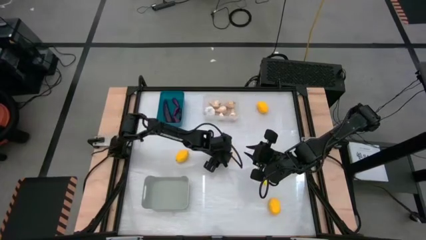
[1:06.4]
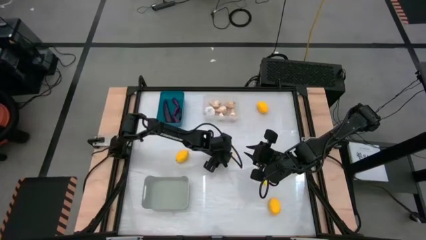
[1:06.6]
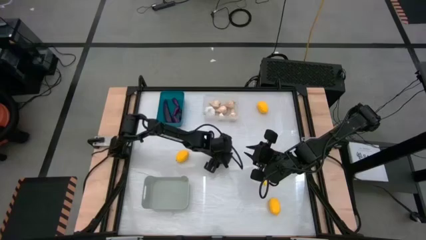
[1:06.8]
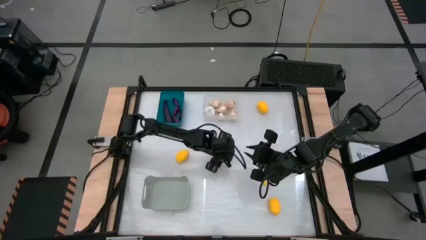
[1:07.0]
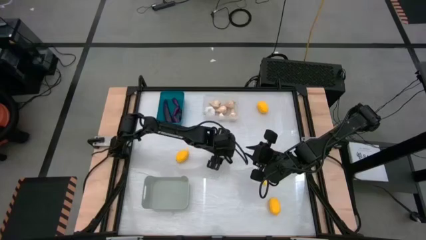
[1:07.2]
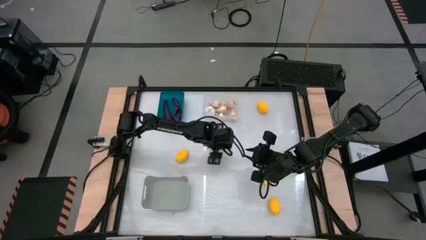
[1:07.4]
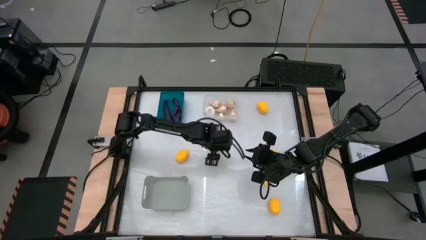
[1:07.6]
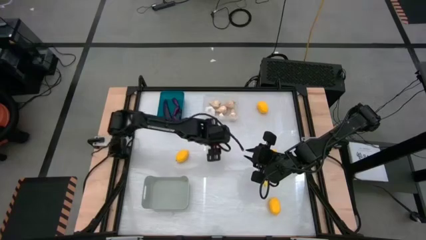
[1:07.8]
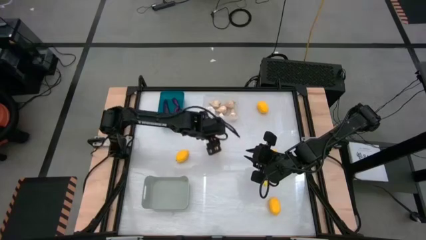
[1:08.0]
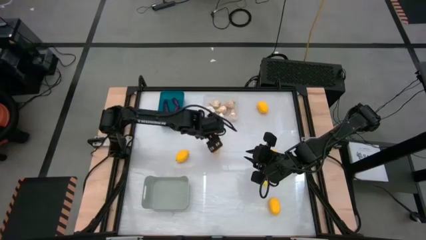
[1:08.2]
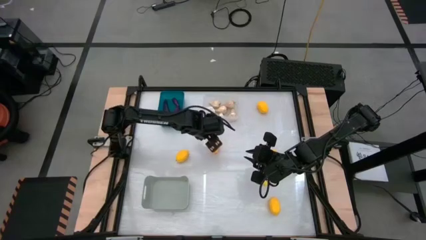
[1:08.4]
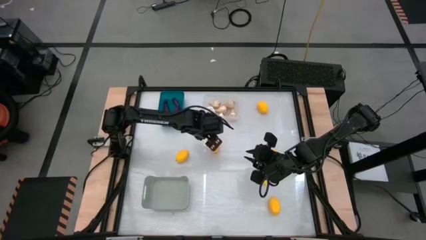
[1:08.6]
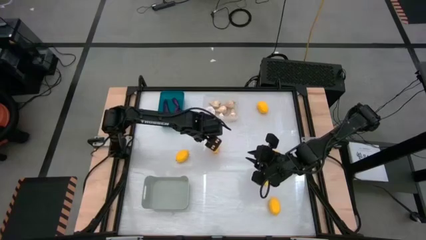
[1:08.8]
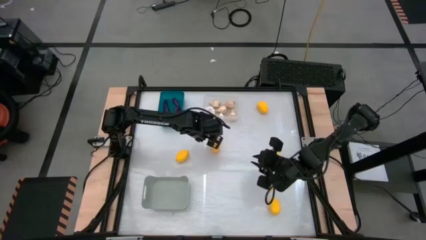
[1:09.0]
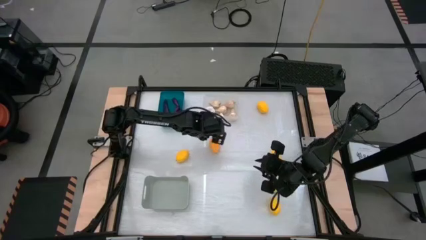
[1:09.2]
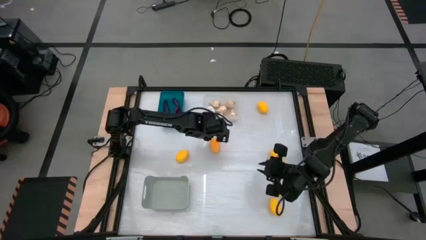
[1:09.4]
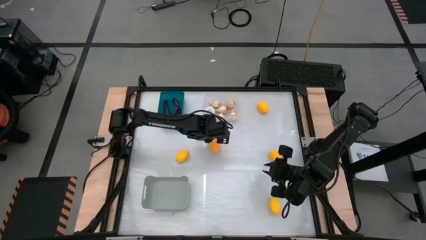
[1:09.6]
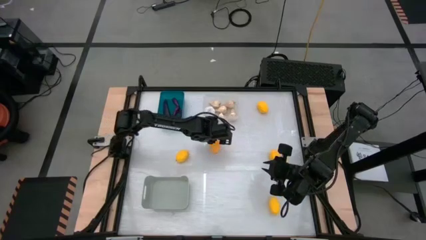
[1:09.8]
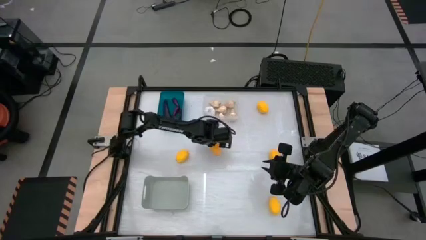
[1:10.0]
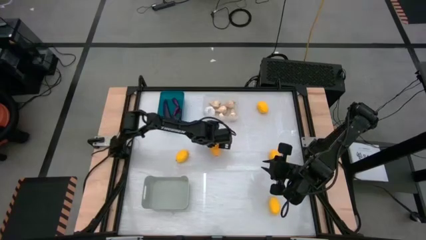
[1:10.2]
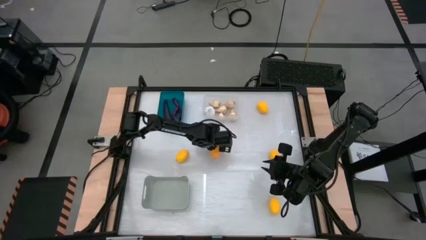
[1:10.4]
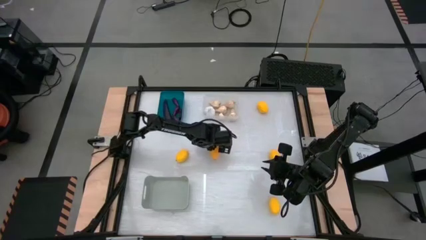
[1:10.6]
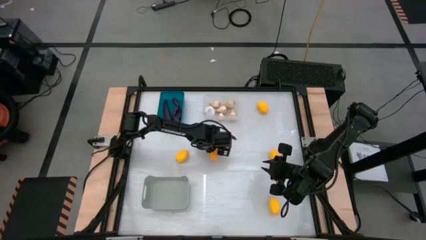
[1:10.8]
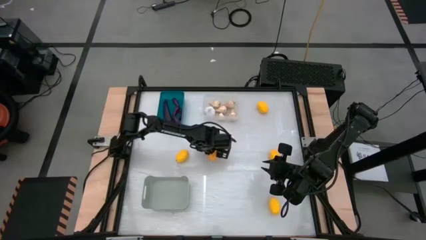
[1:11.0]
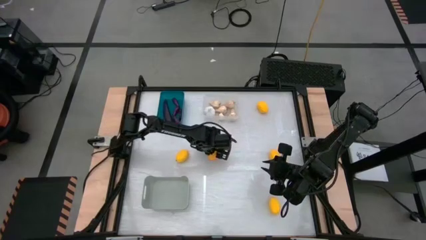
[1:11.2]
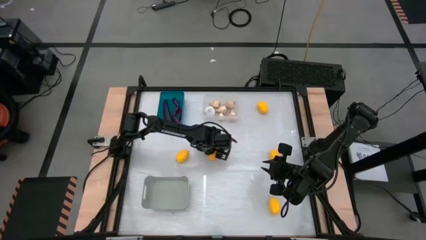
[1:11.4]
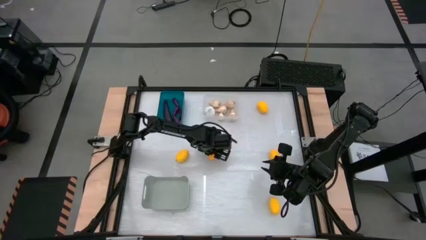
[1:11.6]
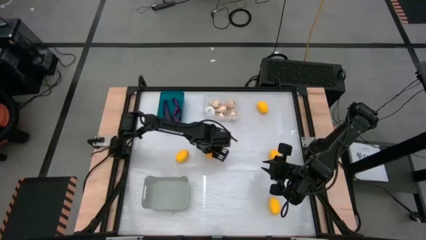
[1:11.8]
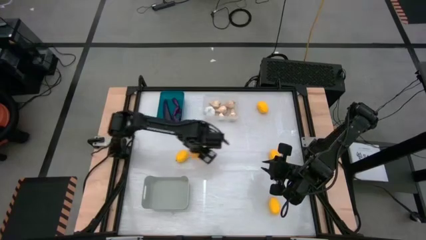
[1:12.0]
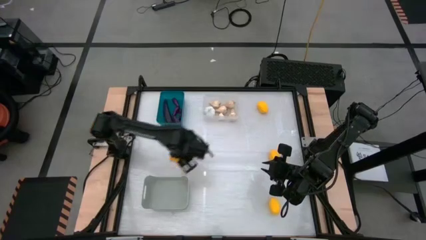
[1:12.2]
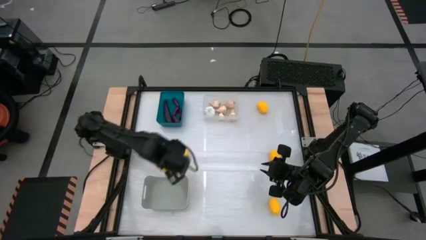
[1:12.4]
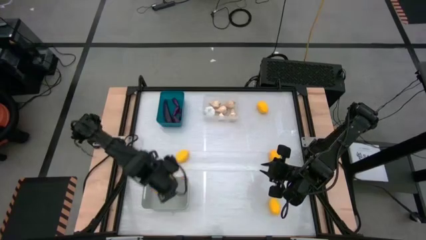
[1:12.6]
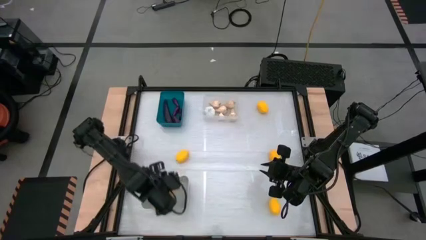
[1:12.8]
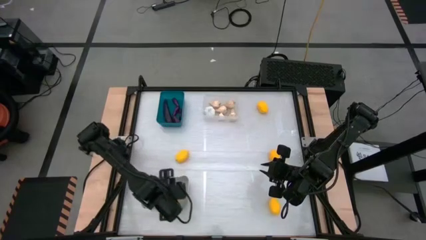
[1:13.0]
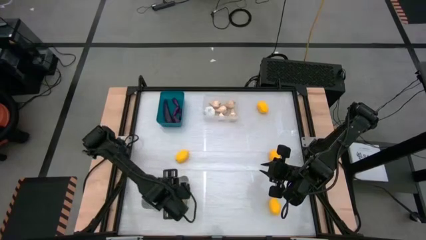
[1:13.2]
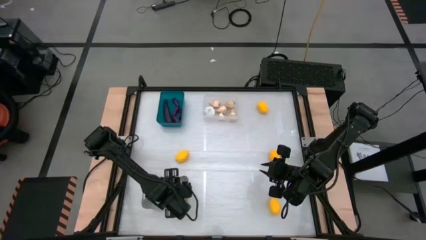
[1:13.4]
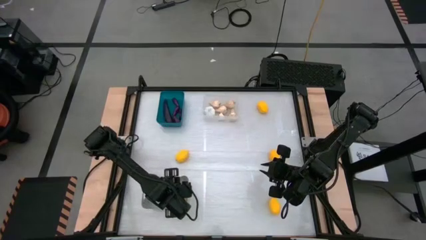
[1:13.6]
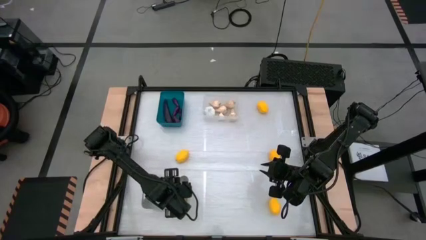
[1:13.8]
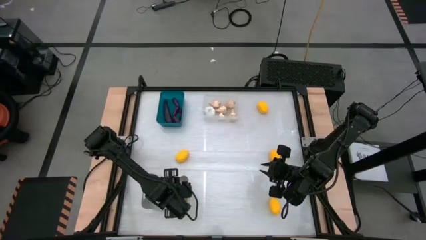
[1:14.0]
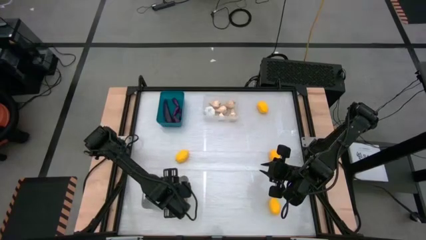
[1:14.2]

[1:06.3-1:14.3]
Task: Sort produce into baskets
Put the lemon into the gray bin

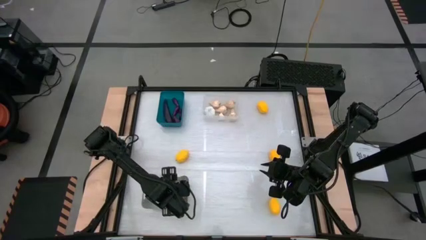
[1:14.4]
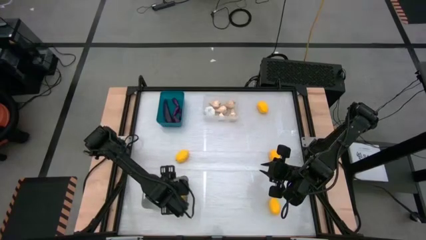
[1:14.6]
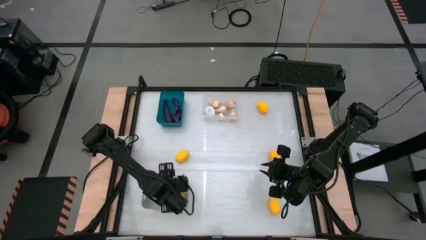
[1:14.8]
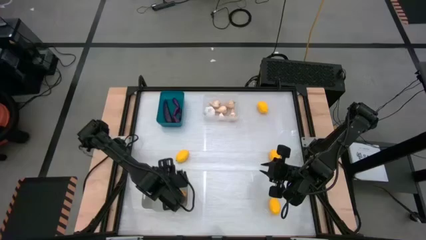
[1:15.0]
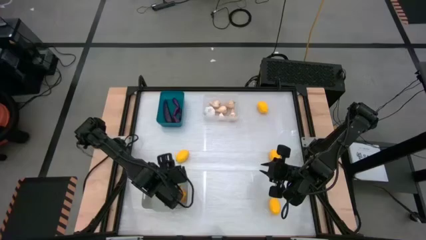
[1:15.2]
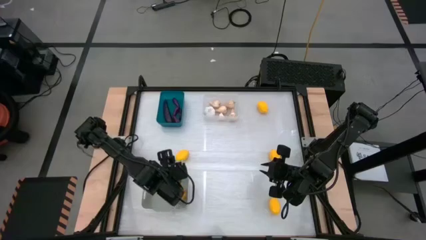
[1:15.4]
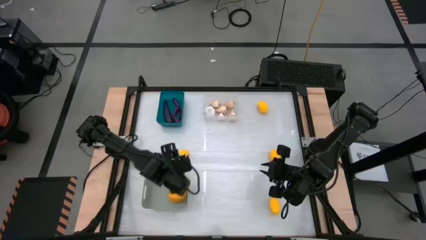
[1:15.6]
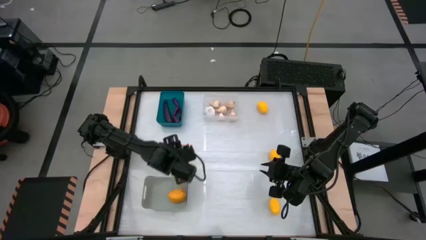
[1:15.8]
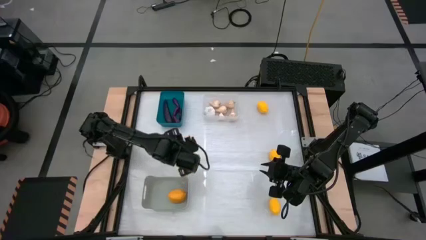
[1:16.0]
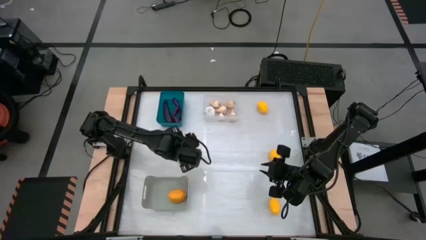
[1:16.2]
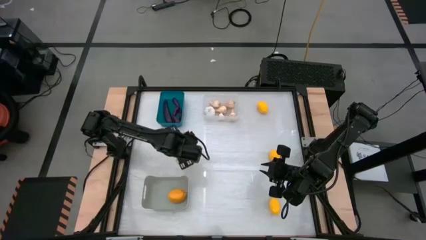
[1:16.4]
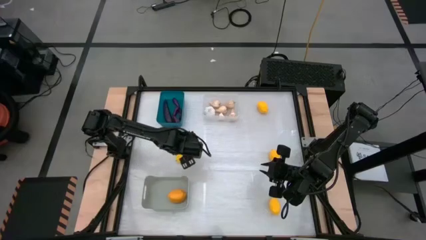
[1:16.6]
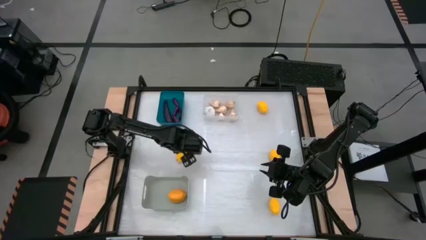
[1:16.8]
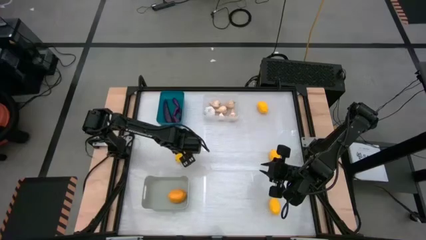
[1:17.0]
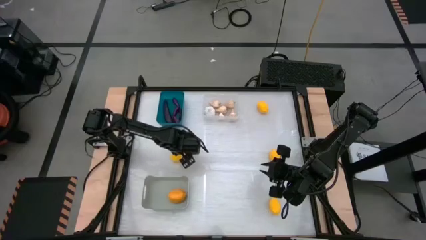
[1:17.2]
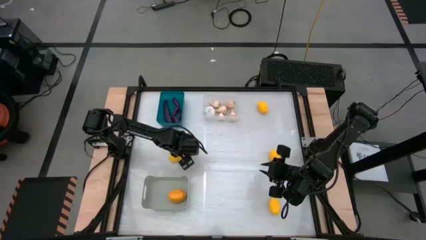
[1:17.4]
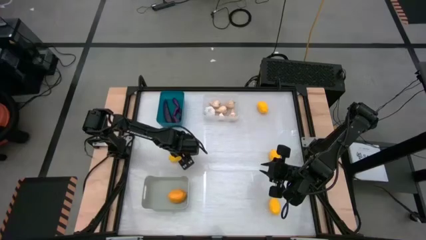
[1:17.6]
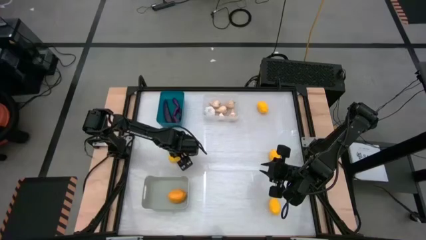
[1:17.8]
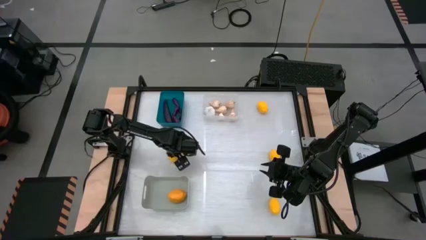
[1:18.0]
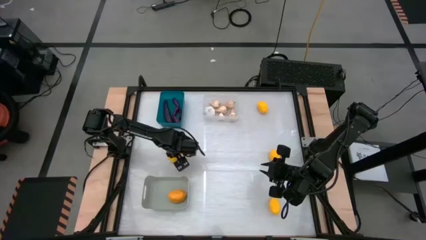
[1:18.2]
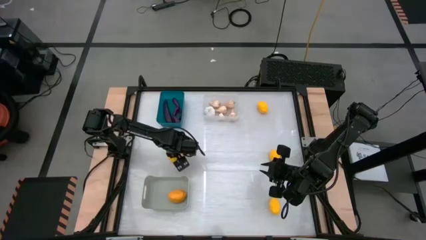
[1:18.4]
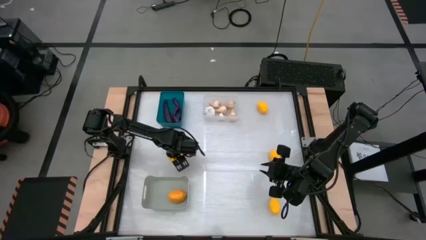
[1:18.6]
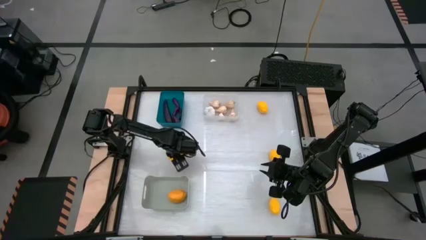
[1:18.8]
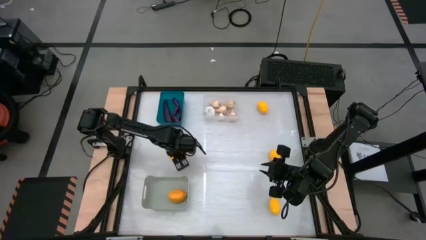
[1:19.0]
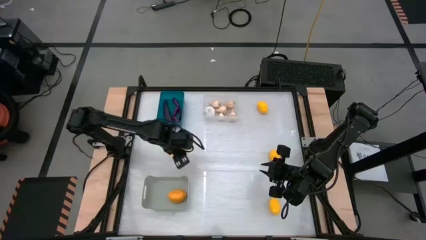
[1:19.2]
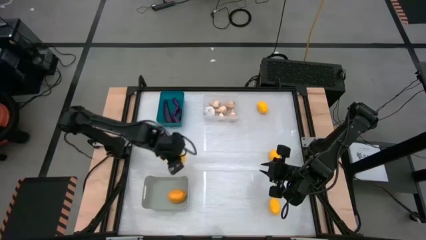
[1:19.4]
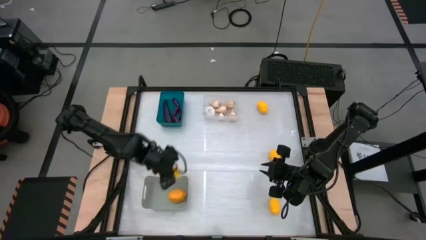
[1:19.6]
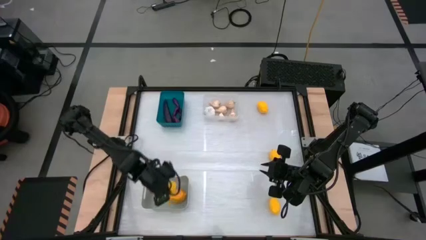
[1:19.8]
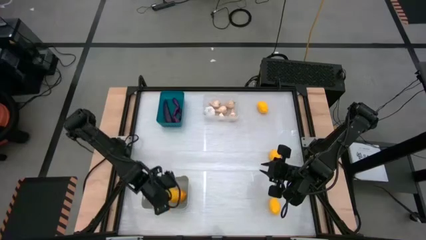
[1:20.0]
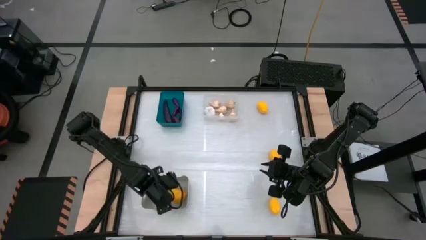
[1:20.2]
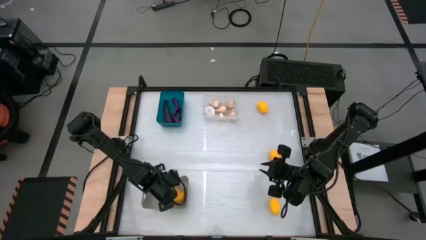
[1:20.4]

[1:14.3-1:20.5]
Put the lemon into the gray bin

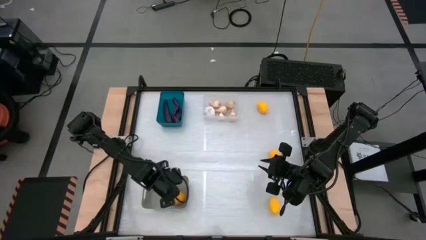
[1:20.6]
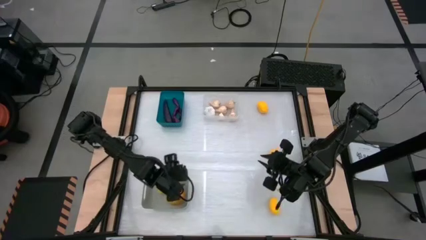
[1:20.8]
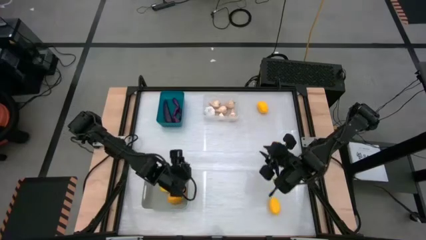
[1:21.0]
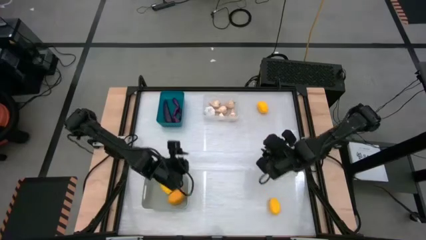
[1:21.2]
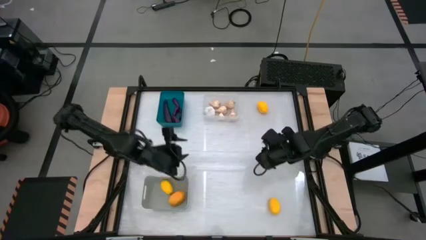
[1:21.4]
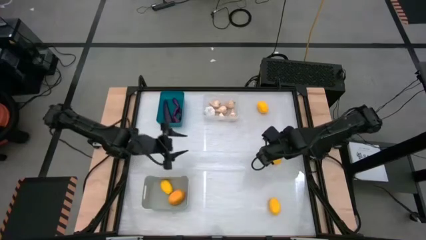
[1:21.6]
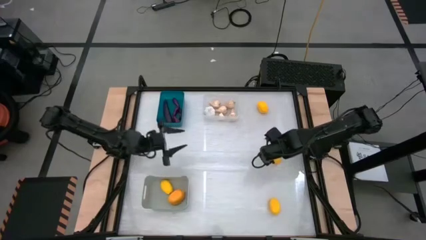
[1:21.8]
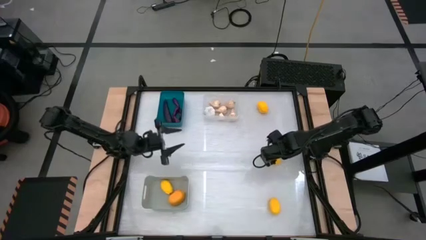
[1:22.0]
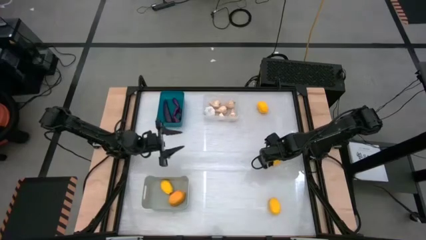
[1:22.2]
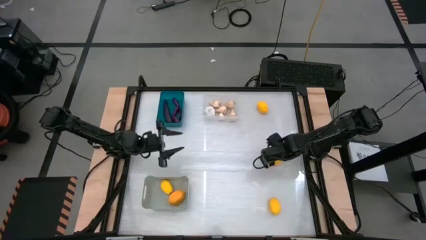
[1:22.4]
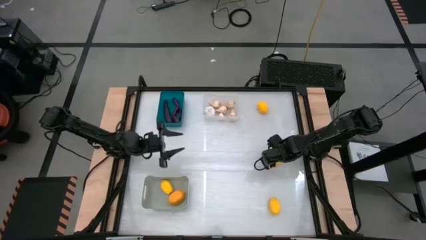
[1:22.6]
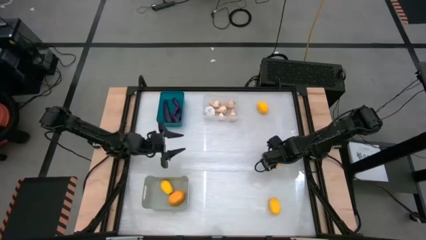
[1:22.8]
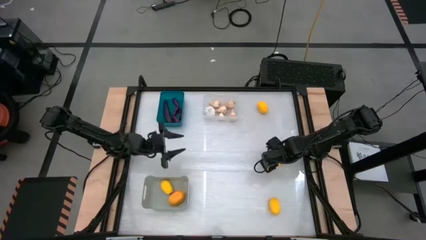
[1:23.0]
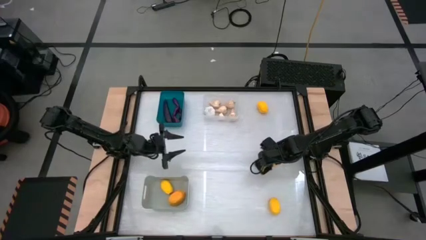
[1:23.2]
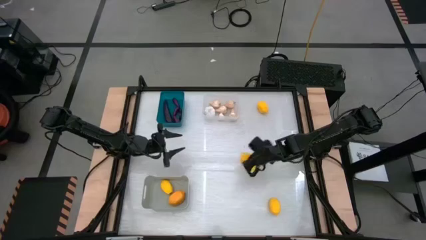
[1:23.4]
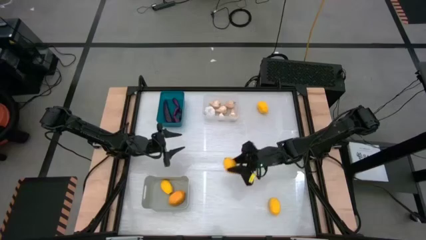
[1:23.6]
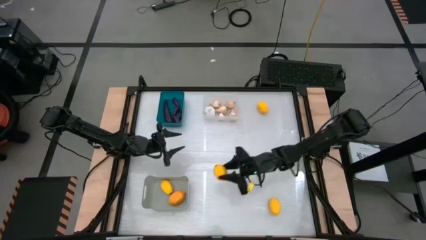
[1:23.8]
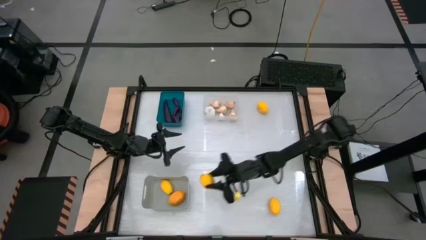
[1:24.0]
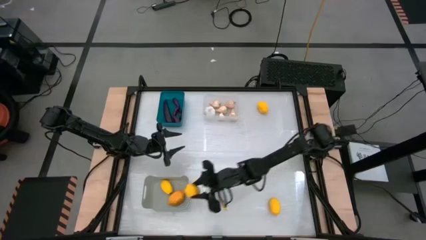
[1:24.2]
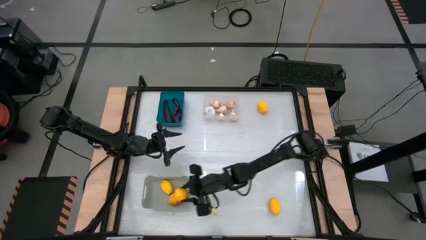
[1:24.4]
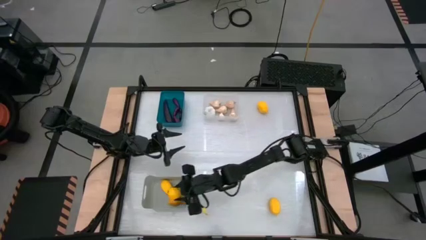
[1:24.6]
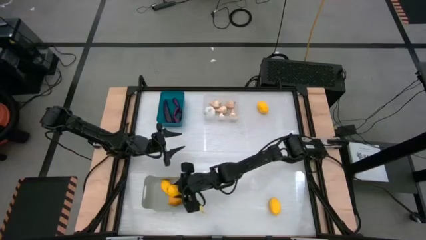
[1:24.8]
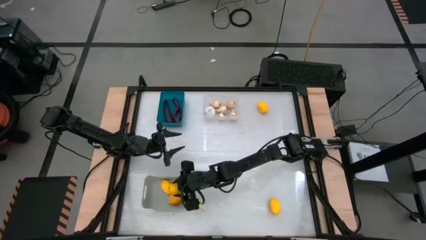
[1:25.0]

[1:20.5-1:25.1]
Put the lemon into the gray bin
